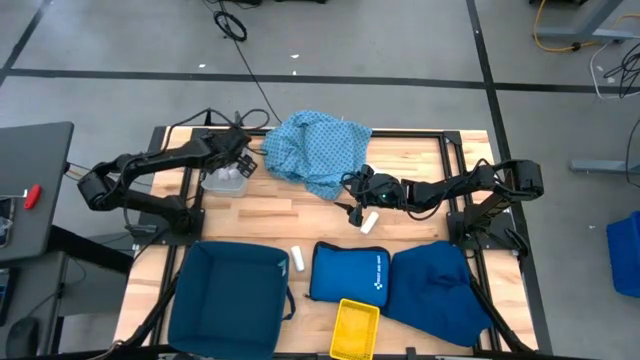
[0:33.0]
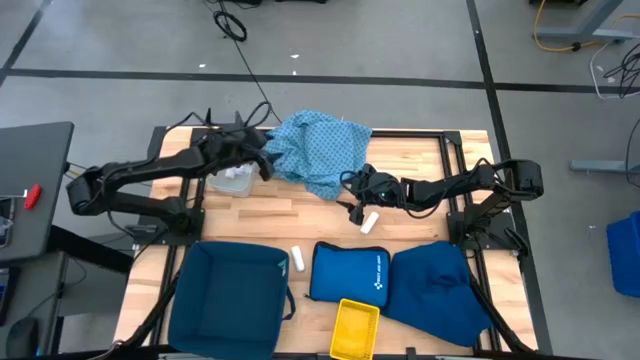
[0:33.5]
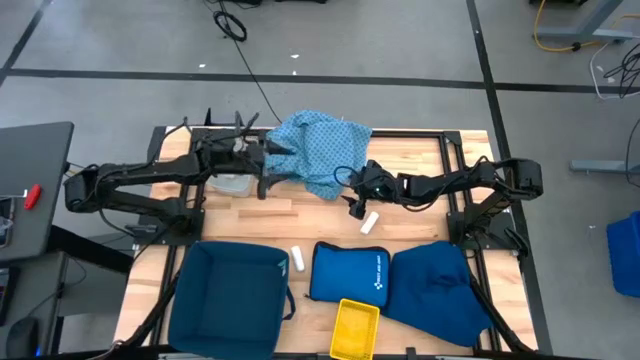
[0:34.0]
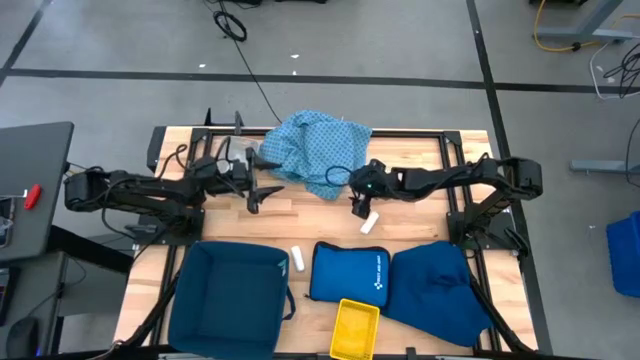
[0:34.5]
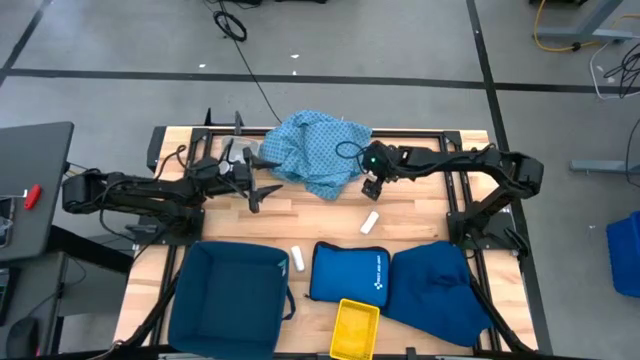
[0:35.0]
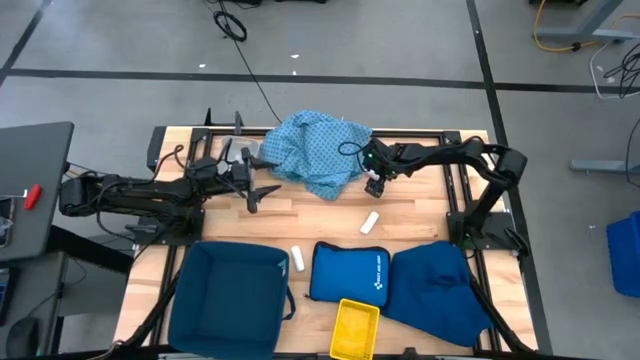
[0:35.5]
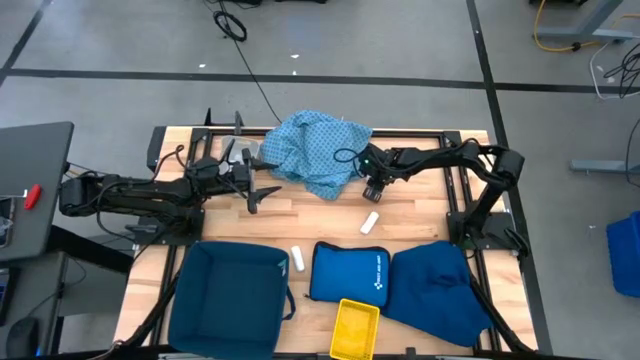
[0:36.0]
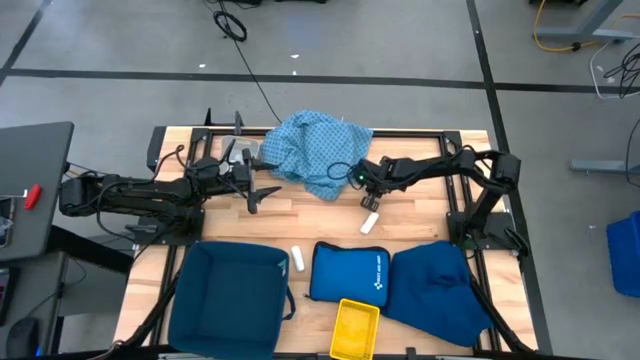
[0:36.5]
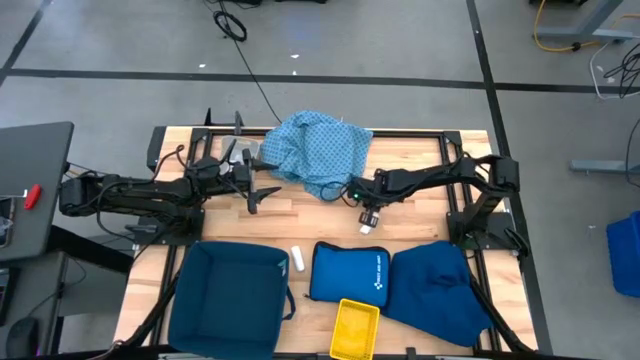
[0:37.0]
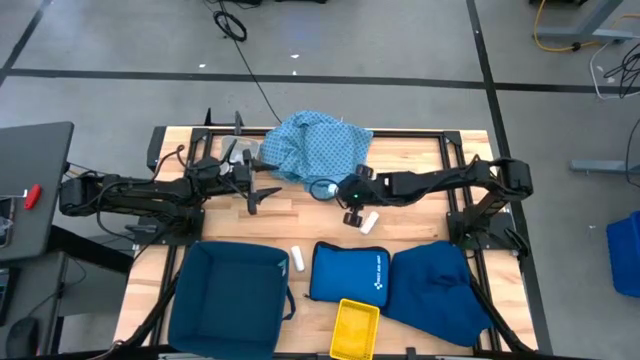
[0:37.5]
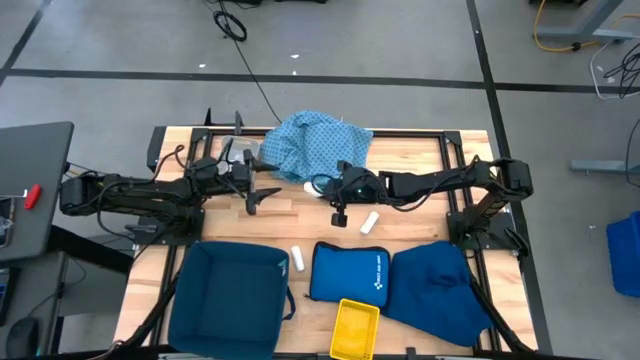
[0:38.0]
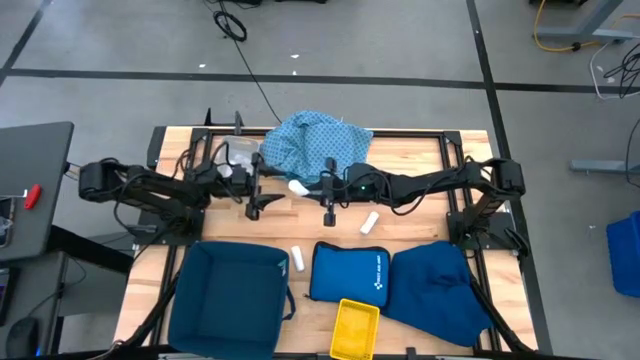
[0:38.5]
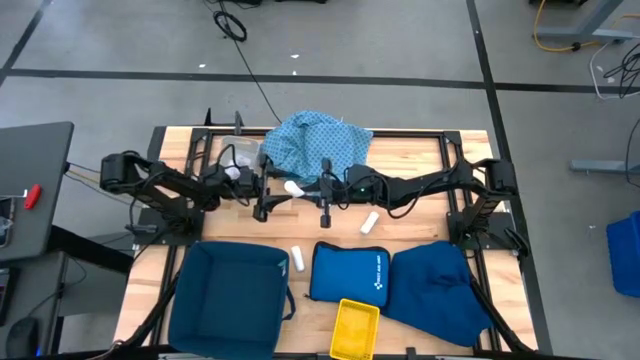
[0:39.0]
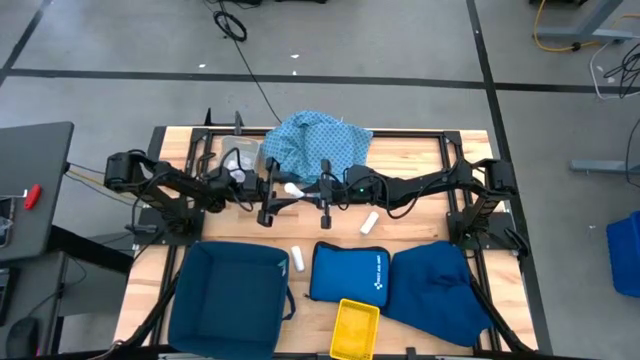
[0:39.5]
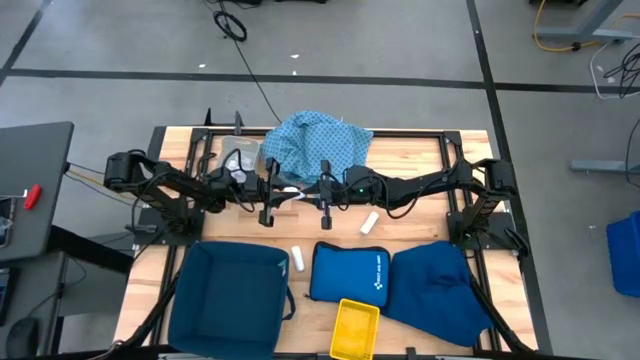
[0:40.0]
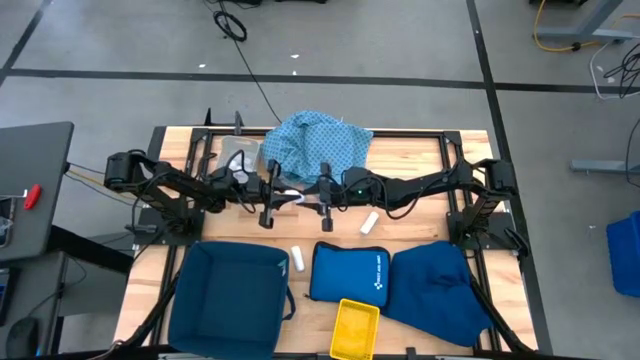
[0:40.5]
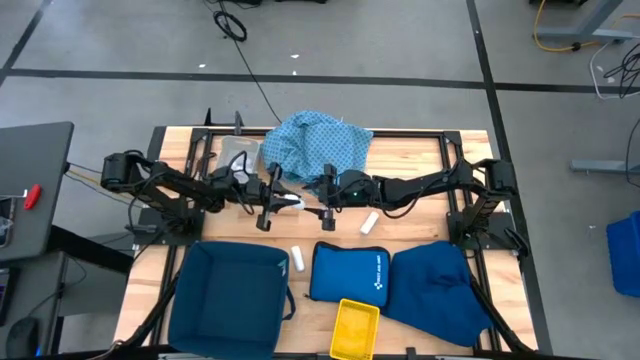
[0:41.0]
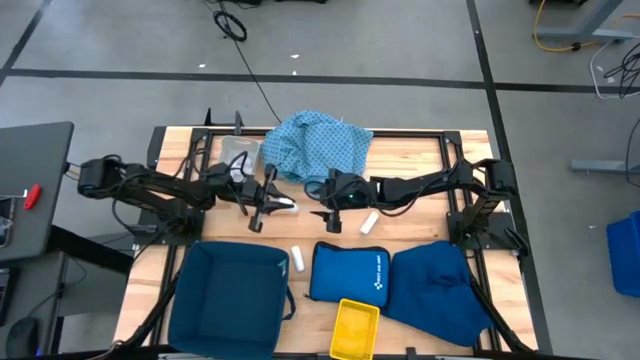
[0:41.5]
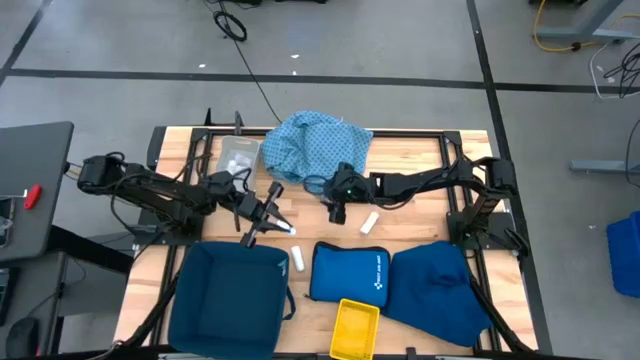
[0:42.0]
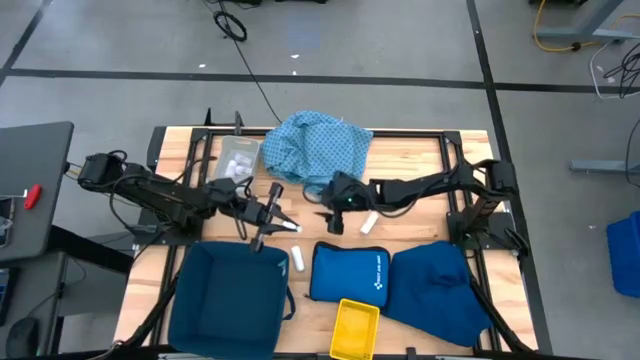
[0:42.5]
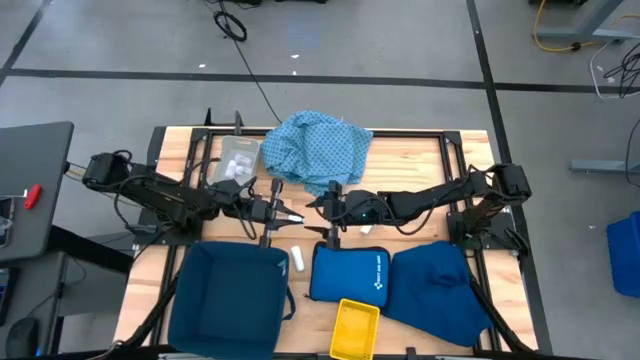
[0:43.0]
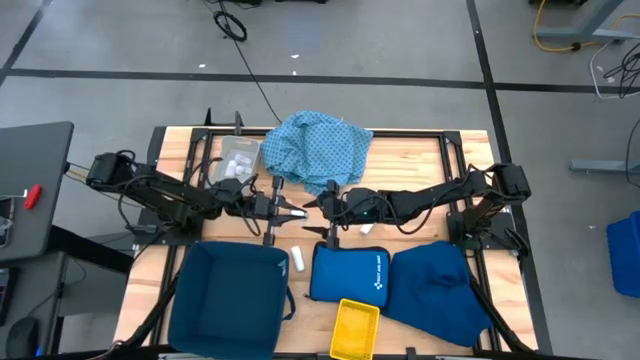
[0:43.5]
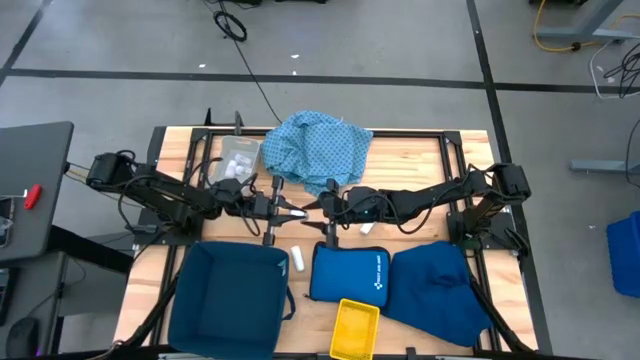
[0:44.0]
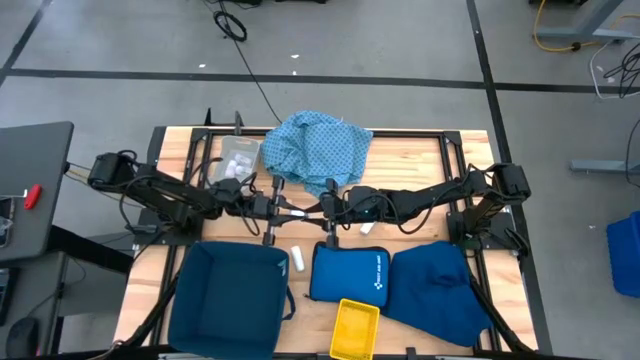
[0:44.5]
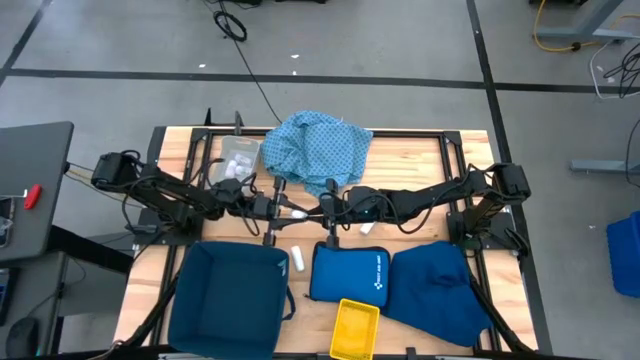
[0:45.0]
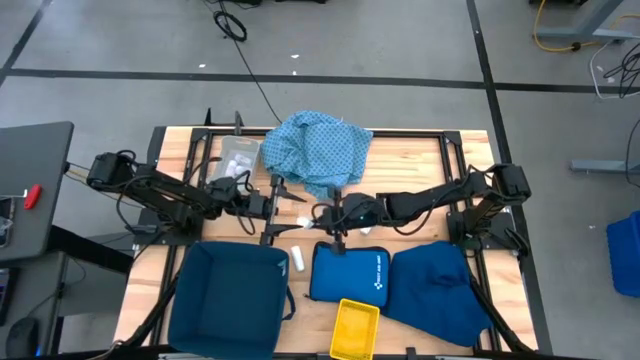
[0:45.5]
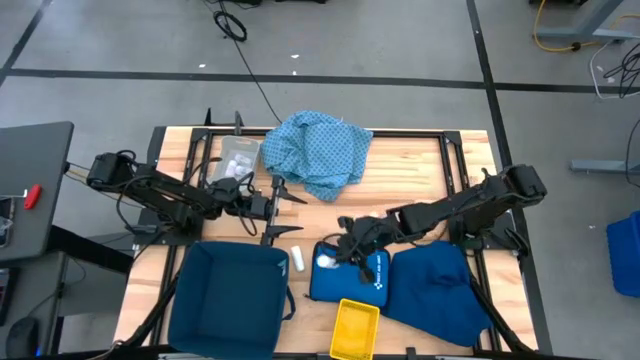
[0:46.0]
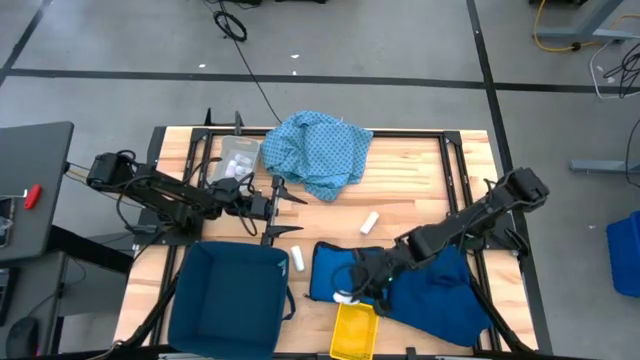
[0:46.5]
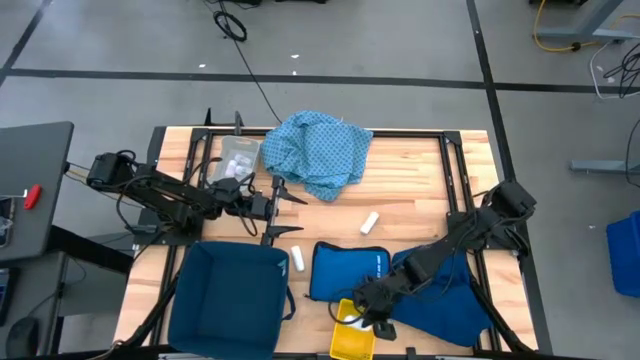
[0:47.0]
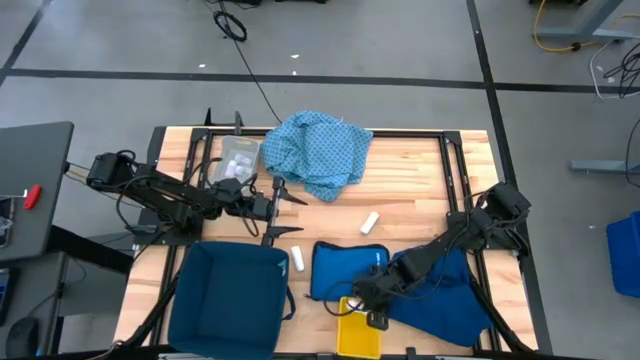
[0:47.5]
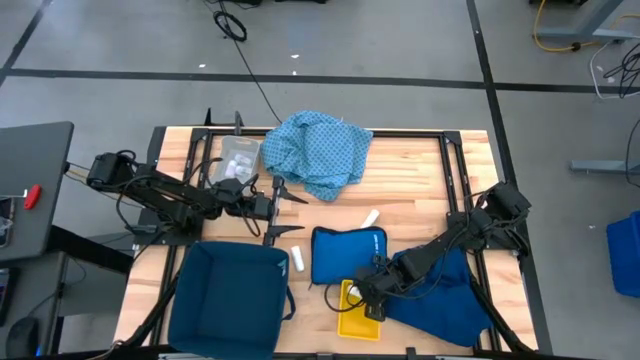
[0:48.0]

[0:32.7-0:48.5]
Task: Pick & place medical supplies in basket/bin
Put the top rolled gauze into the yellow bin

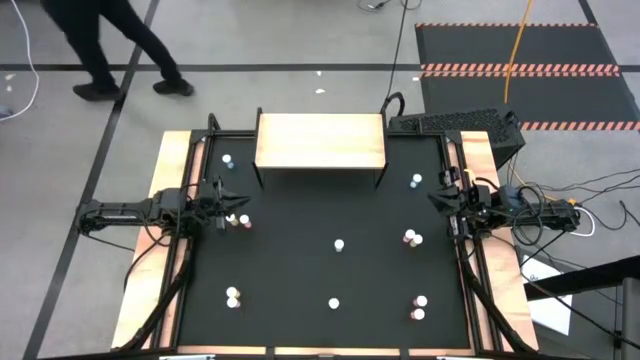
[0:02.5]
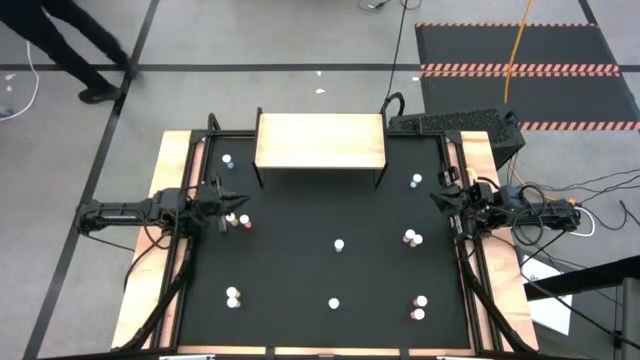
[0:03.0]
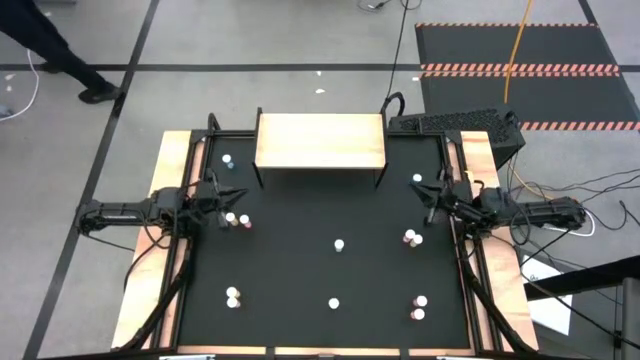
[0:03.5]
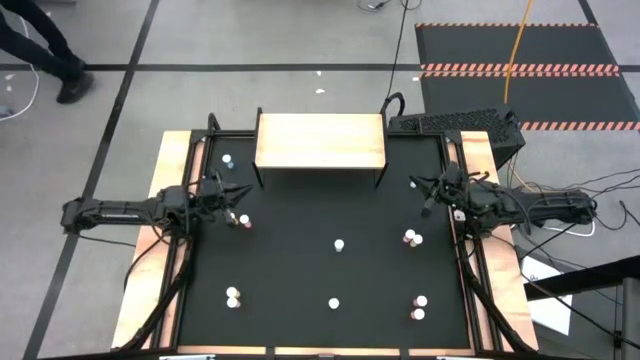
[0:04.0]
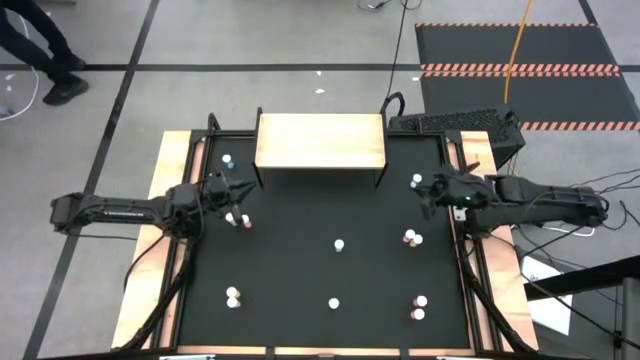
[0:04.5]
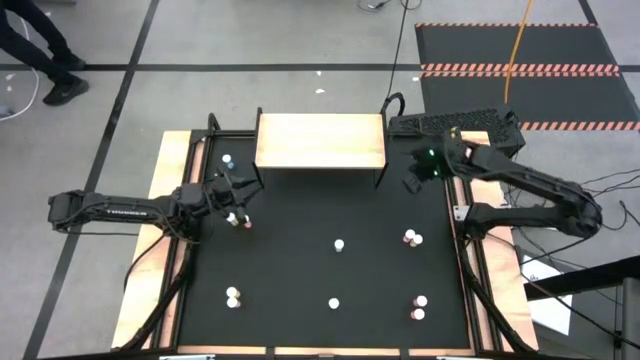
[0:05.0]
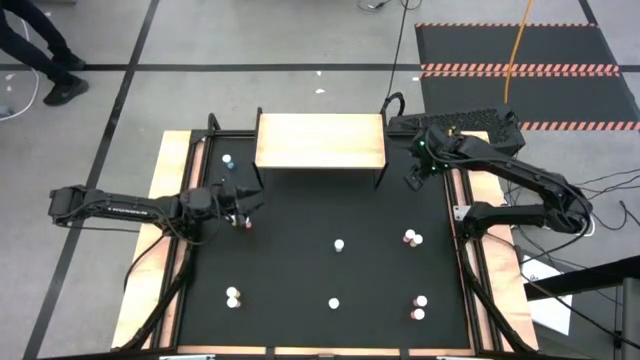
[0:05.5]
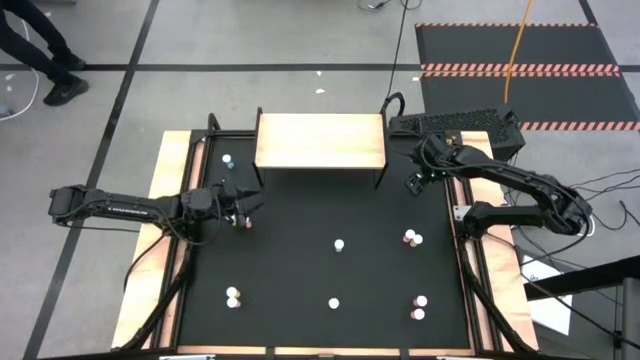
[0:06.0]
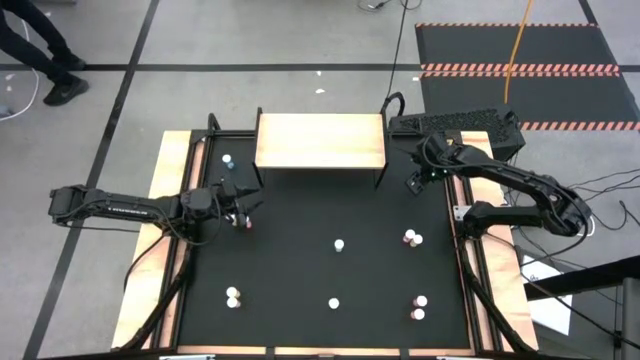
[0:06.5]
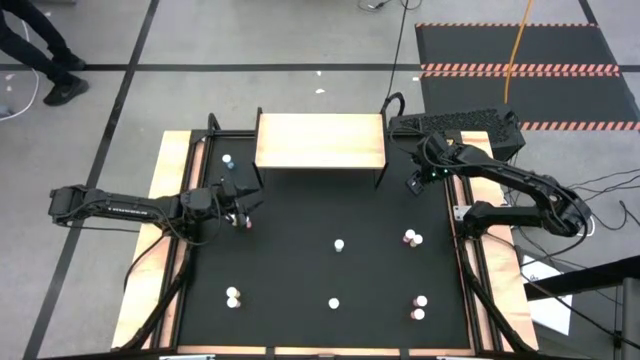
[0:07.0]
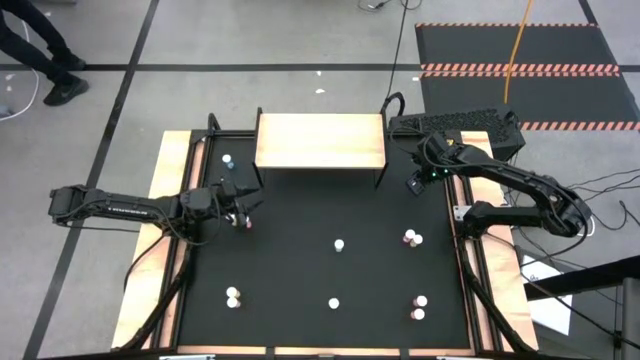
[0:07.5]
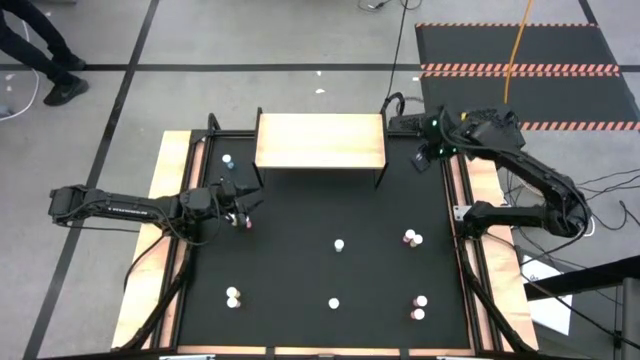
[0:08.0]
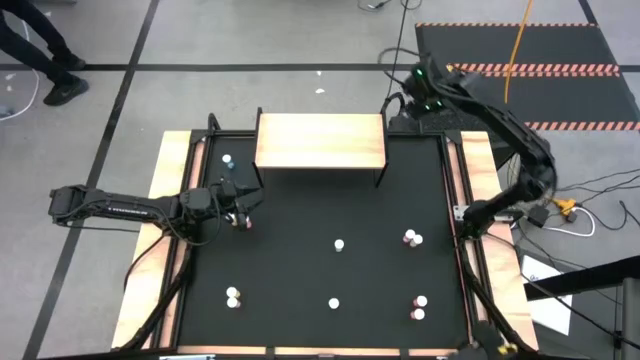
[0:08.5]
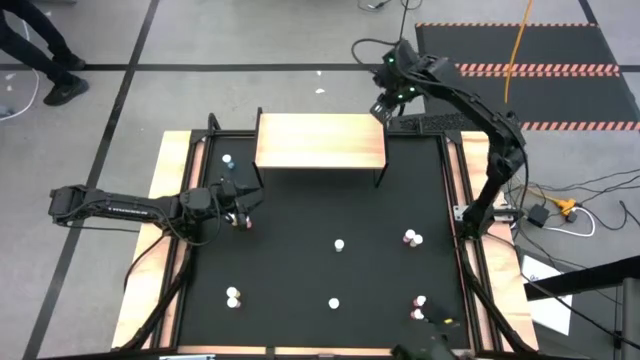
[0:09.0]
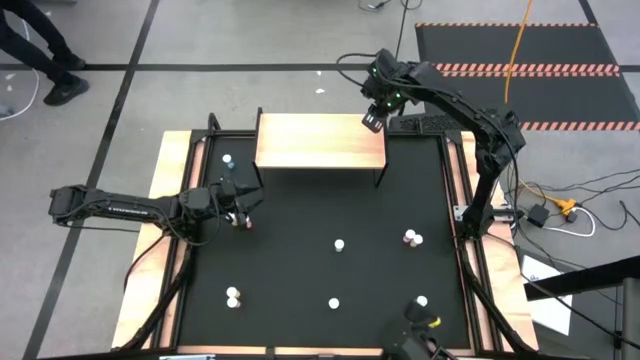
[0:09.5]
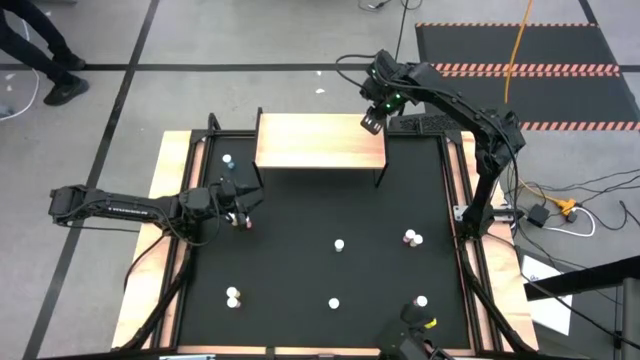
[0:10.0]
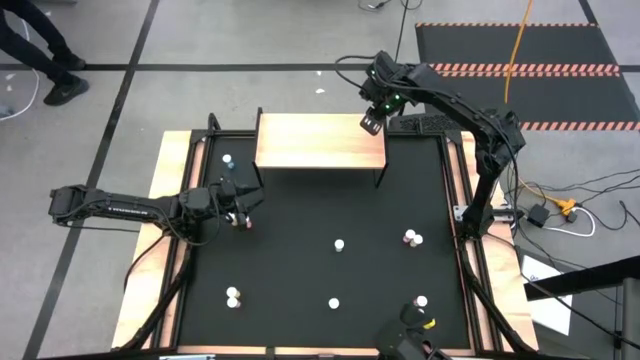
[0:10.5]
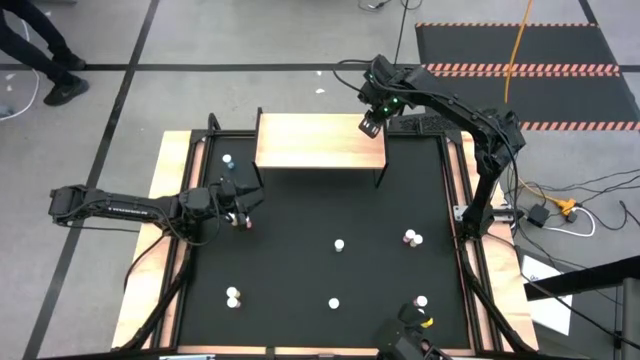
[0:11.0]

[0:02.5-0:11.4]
Task: Pick and place medicine bottles onto shelf by color
Put the top right blue pill bottle on the shelf
